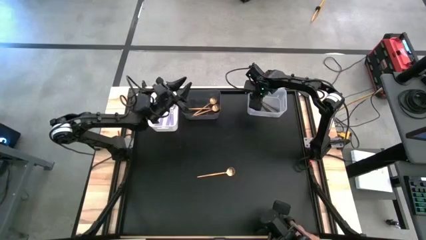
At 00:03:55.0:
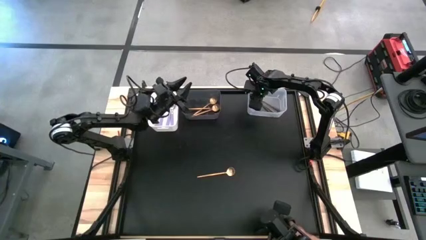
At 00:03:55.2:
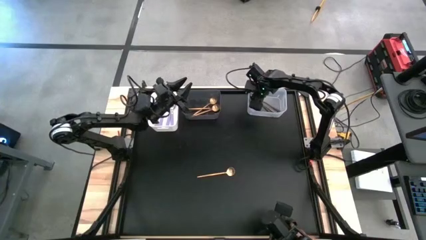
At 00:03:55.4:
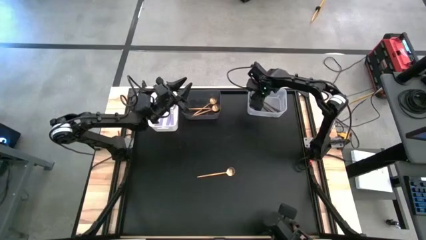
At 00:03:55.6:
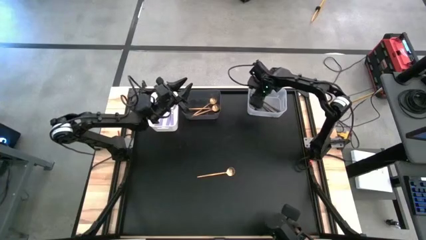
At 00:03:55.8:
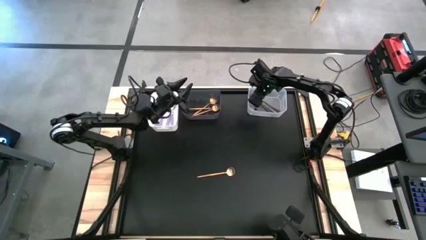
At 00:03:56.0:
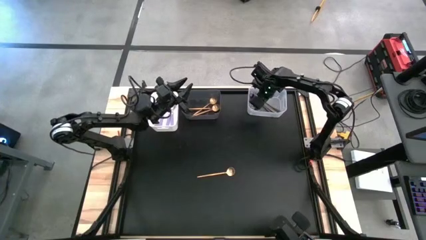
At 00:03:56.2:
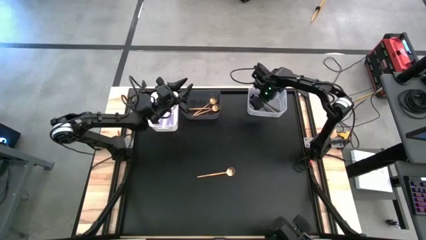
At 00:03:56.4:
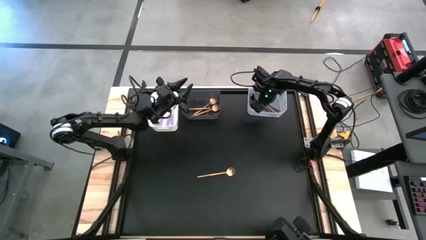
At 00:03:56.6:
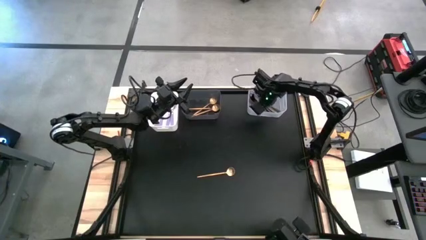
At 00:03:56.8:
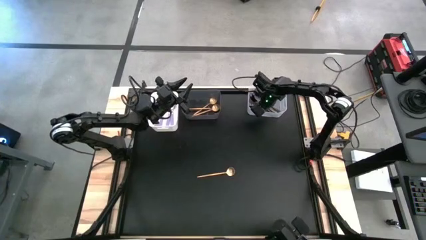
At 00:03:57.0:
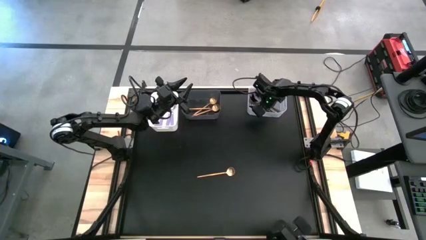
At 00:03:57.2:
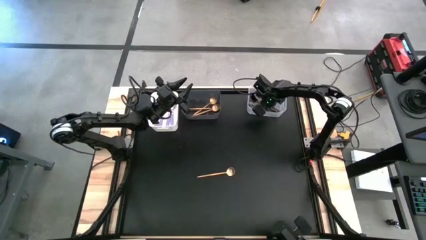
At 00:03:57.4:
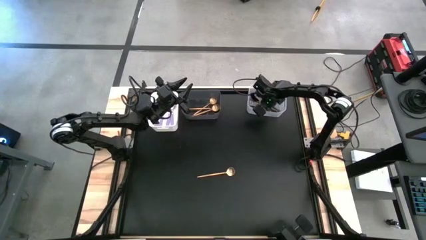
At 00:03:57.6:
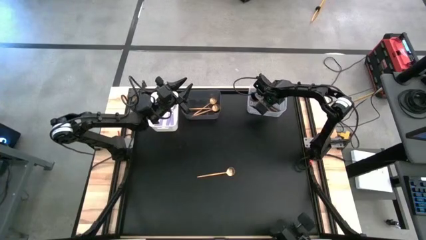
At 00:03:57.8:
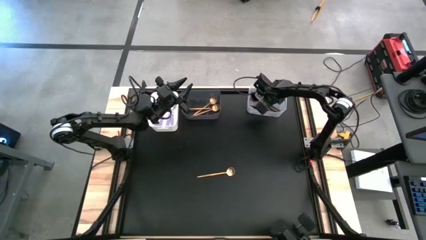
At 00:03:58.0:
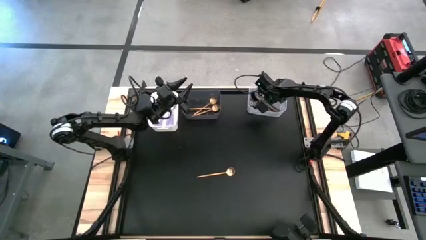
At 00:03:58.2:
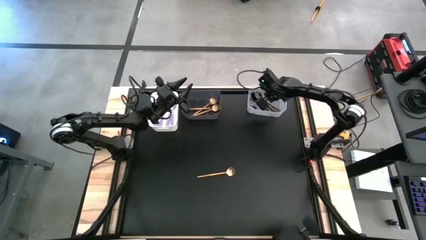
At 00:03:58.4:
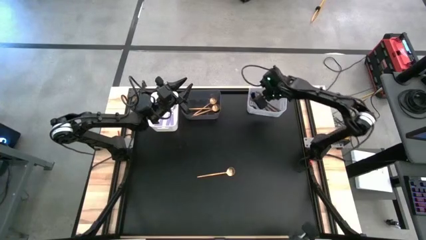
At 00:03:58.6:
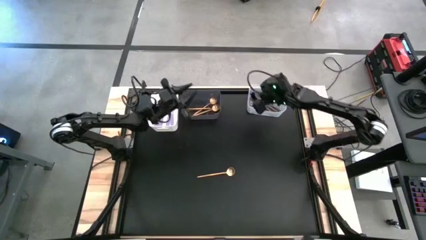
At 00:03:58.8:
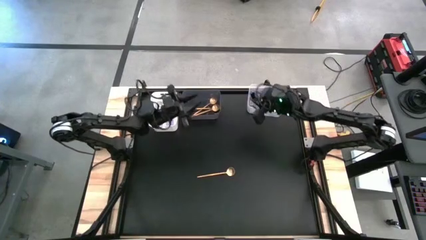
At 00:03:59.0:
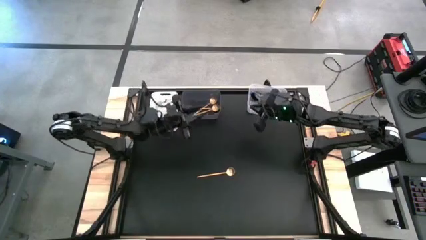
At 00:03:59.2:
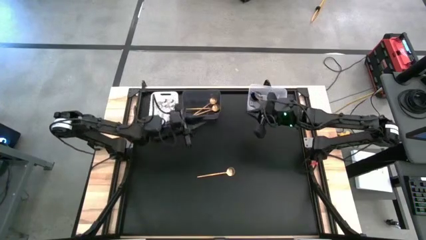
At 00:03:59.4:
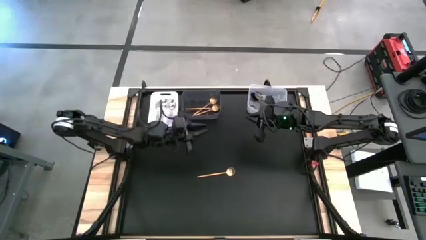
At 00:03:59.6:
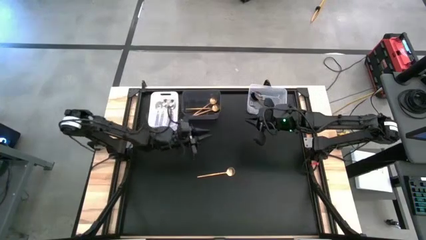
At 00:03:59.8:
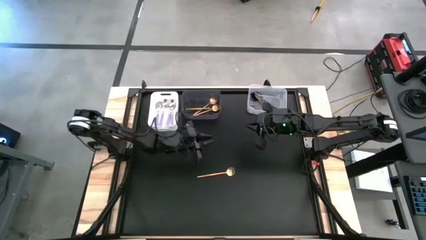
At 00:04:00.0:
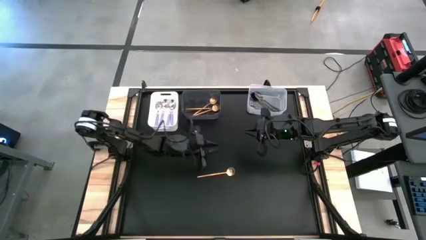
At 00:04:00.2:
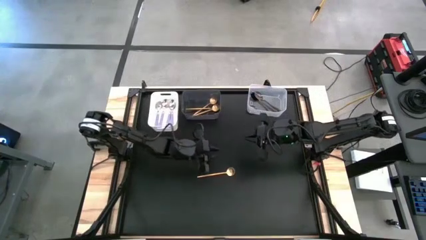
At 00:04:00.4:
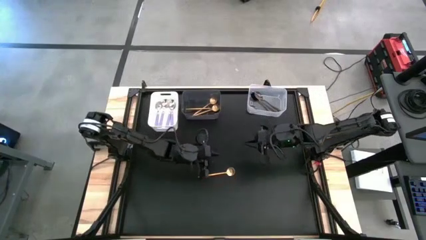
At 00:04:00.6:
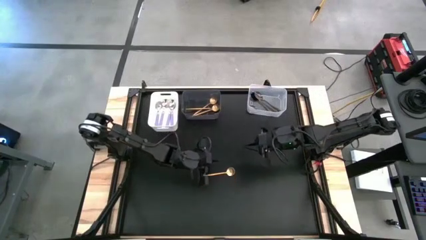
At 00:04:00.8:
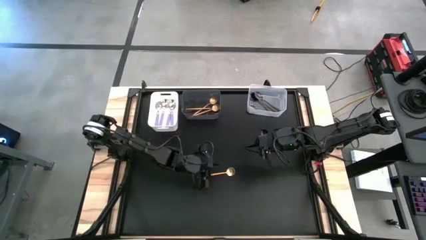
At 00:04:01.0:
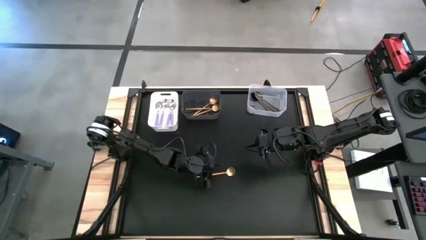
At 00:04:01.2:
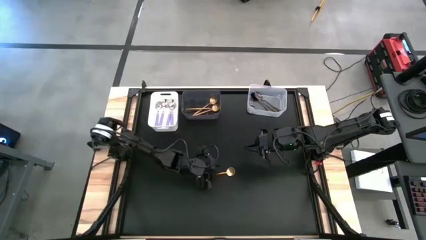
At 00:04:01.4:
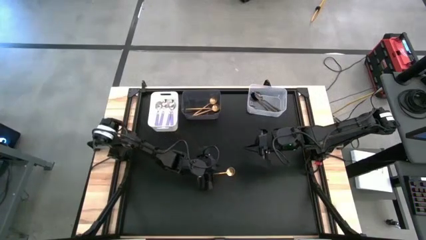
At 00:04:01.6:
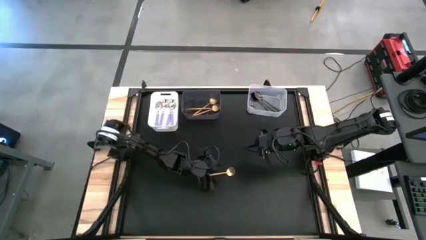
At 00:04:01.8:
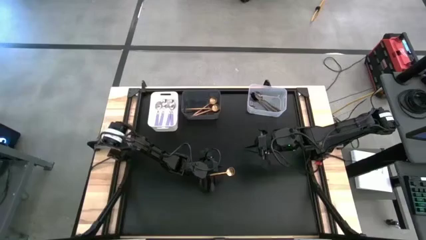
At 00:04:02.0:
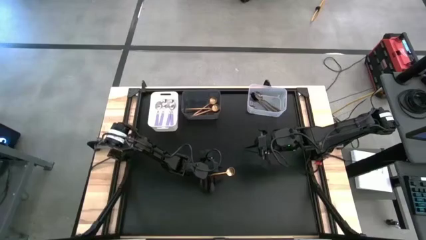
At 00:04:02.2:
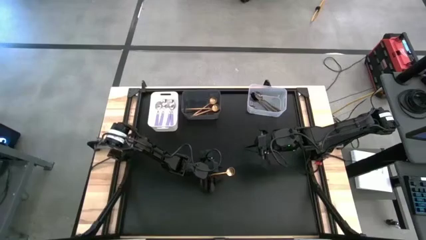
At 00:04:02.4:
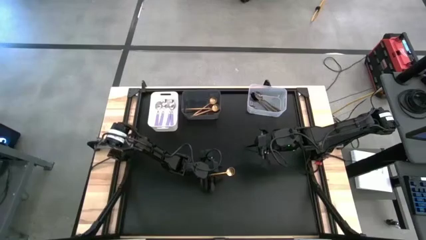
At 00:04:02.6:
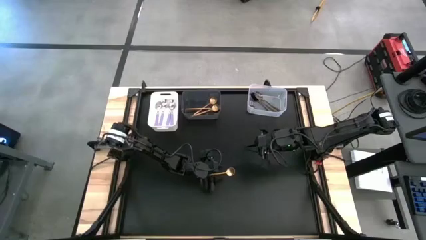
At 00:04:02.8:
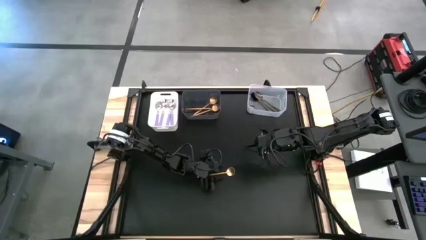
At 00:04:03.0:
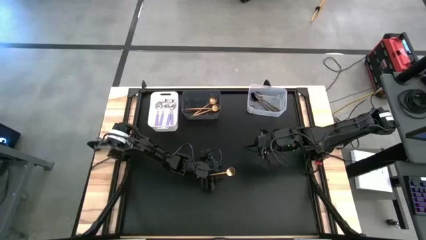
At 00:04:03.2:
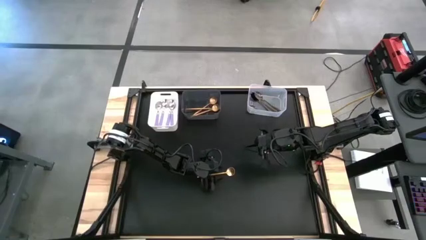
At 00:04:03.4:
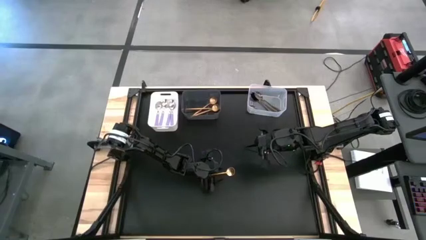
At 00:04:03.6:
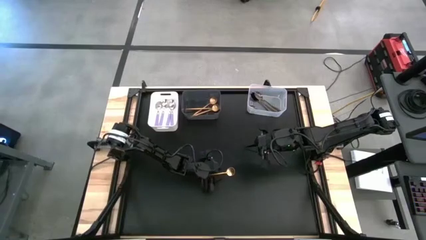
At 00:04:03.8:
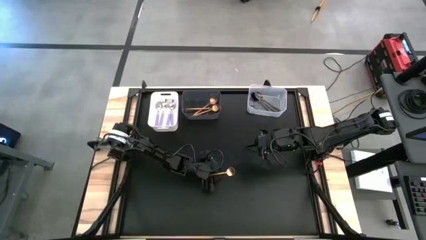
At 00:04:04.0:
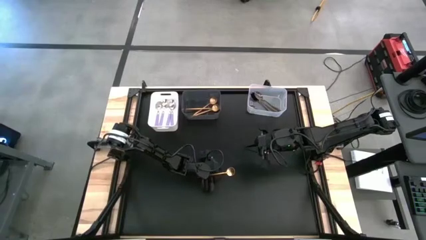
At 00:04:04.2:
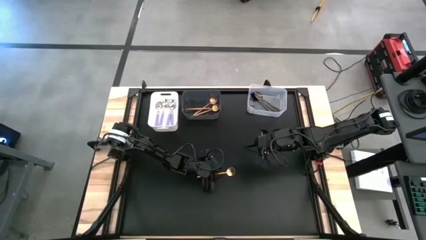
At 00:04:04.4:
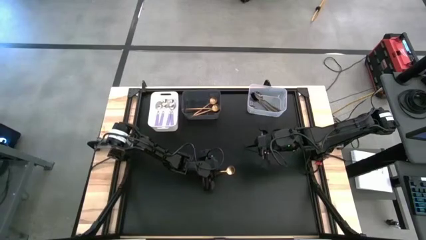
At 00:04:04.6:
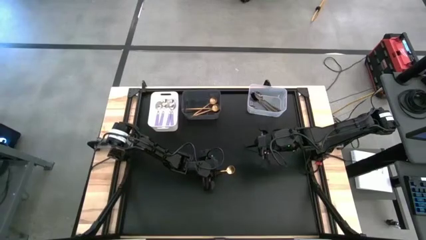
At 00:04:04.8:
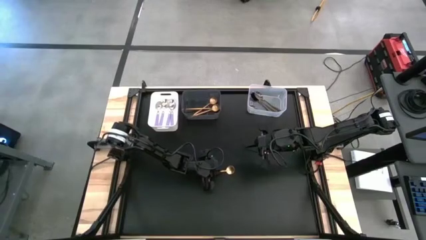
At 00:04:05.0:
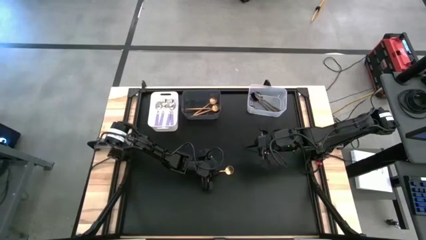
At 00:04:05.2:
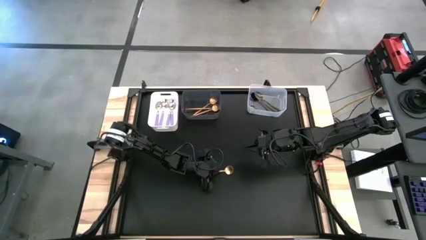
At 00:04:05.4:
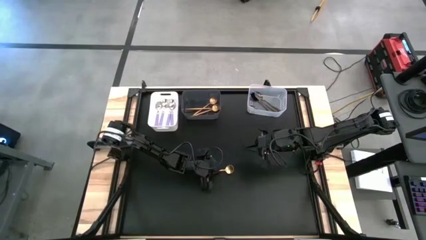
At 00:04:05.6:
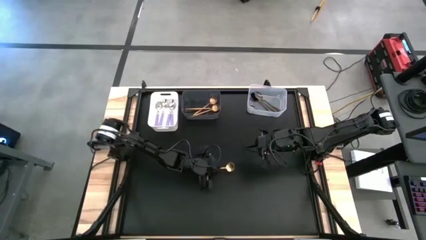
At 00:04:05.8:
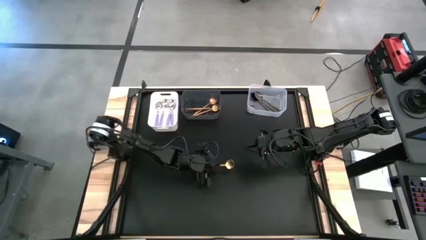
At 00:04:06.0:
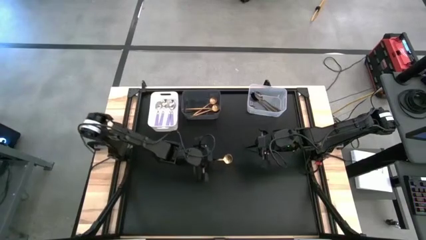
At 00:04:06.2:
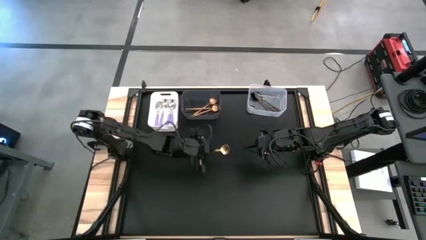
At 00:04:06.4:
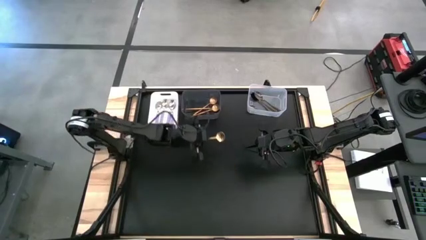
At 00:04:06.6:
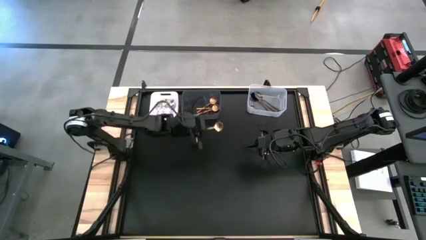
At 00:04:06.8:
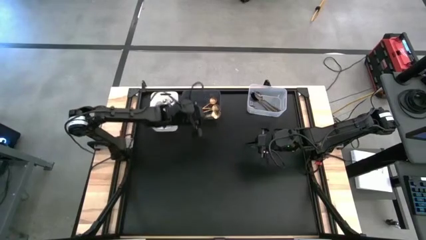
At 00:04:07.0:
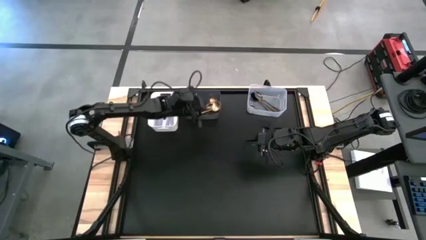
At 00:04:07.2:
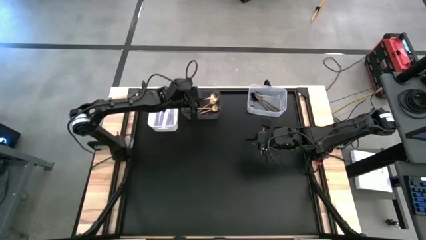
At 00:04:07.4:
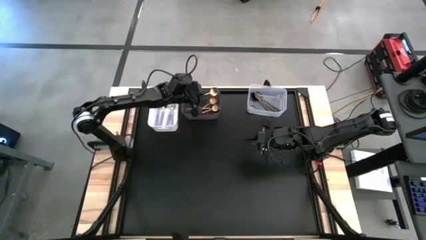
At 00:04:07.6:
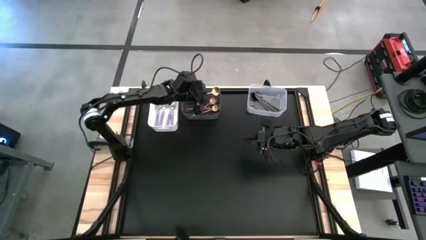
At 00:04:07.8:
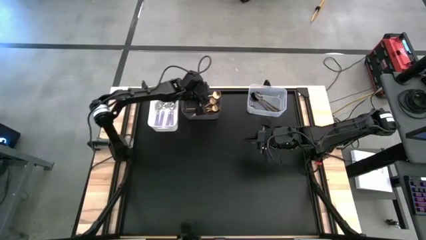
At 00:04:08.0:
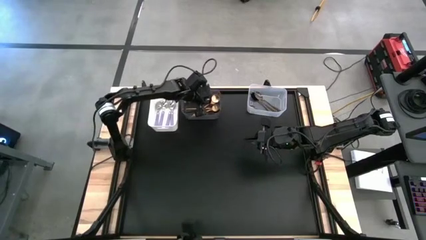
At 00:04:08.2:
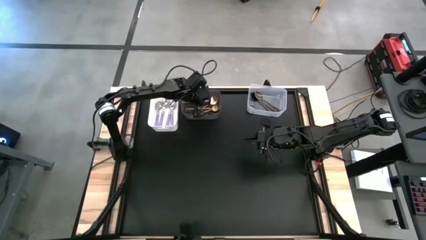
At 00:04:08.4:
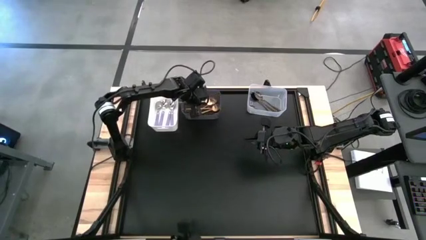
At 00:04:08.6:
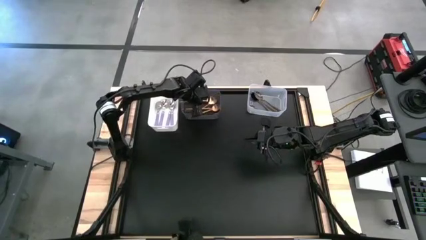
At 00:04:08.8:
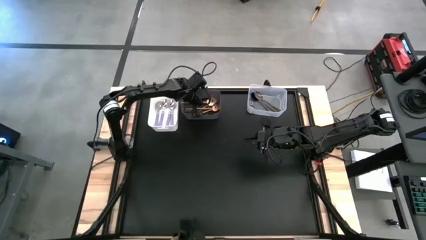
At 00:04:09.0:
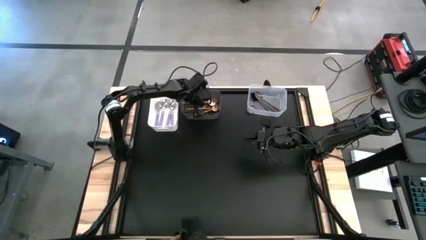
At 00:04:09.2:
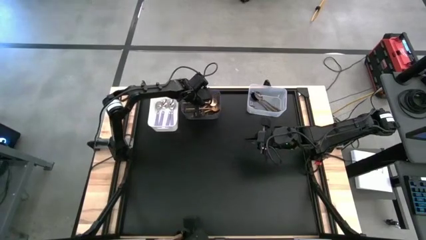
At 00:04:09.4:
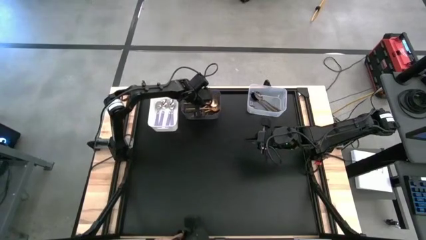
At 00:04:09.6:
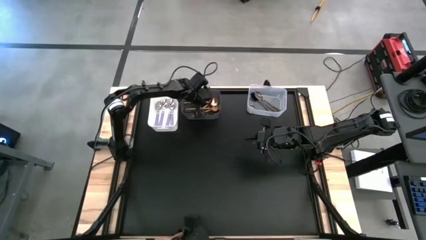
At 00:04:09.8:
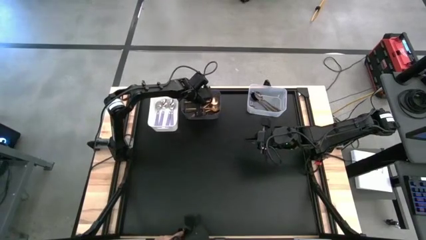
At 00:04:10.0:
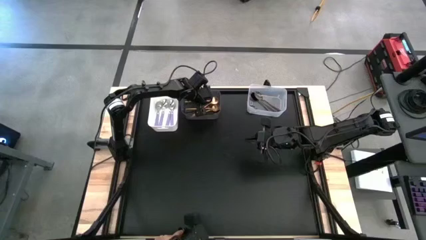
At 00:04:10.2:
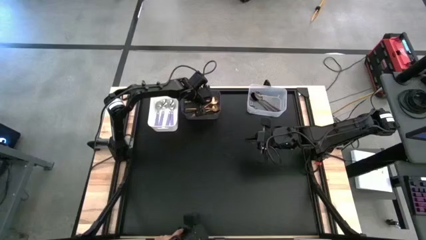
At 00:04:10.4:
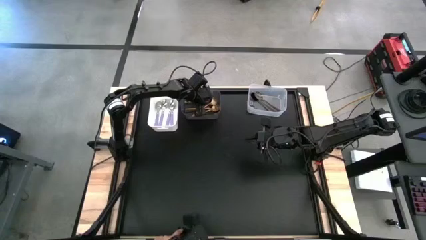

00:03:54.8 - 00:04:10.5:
Task: Sort silverware by color (type)
Put the gold spoon into the black bin
